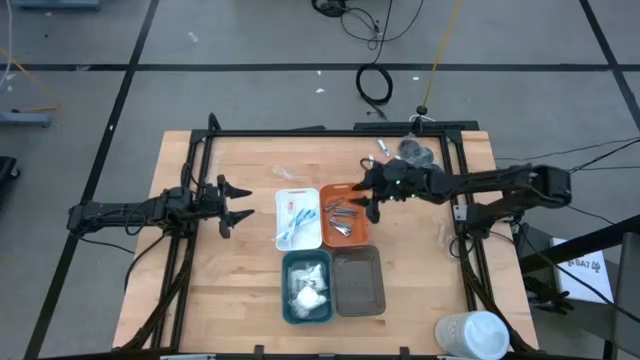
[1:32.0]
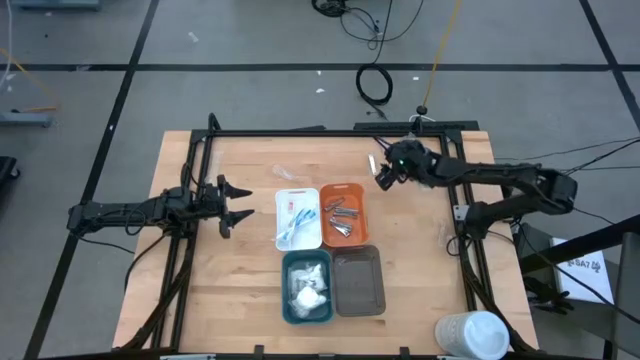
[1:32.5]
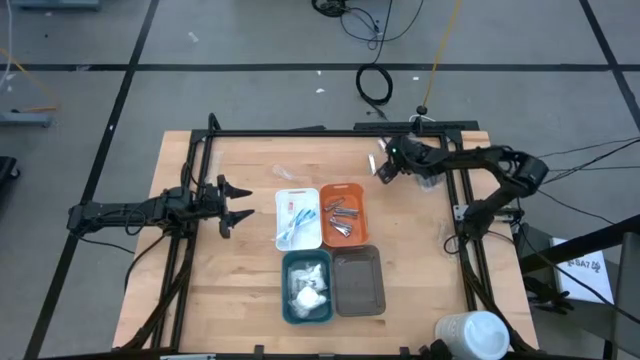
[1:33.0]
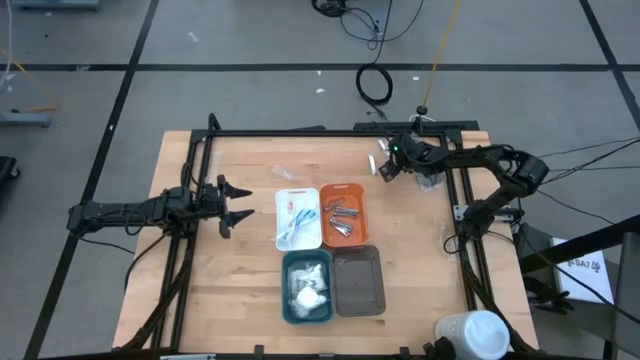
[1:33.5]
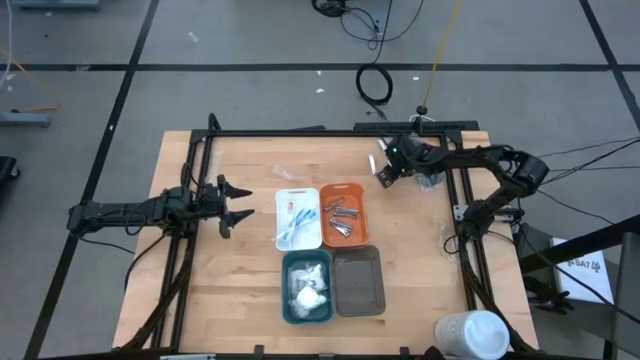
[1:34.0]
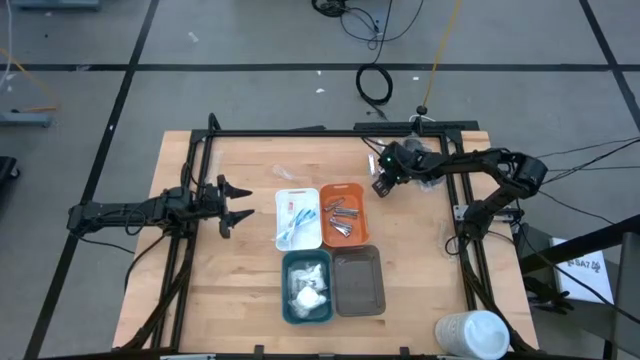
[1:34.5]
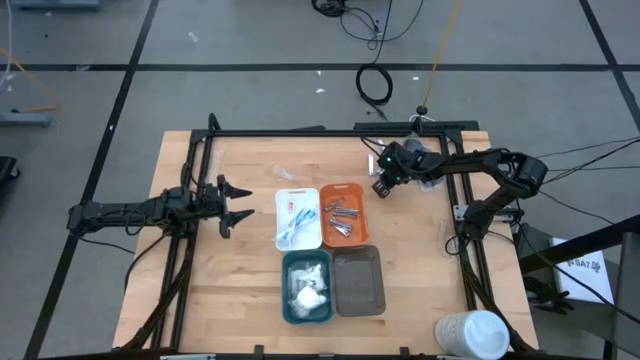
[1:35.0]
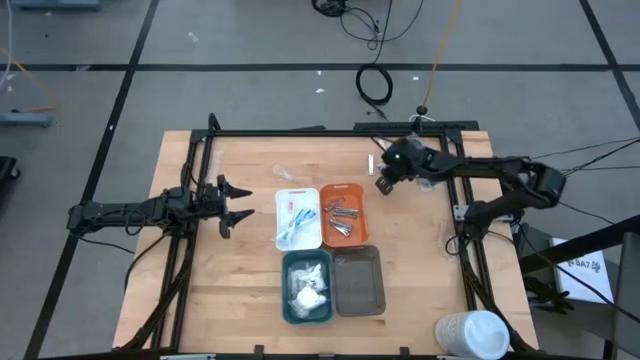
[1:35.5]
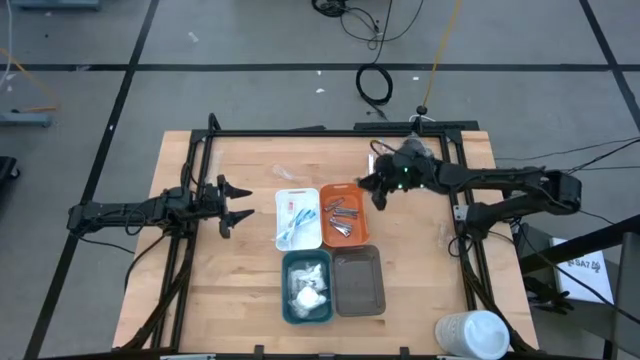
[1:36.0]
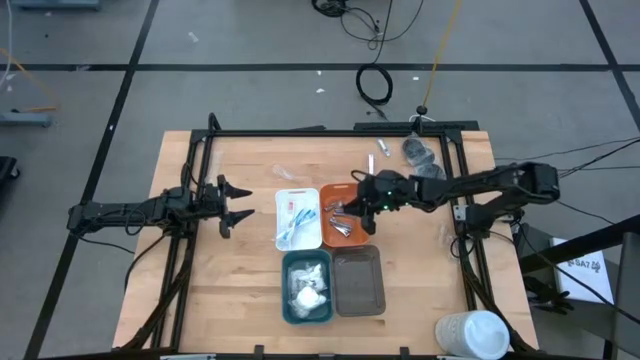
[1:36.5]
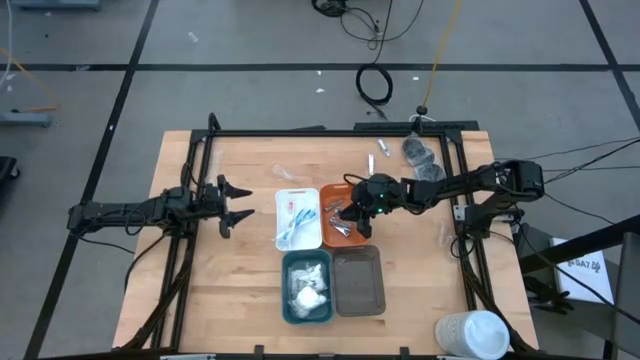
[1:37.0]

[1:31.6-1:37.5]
Task: Pick & Place Travel size toiletries
Put the right nail cutter into the orange bin

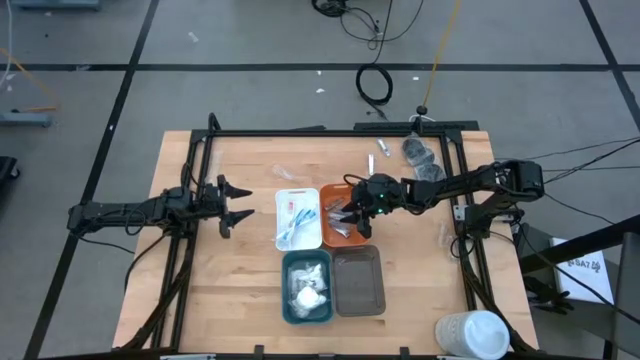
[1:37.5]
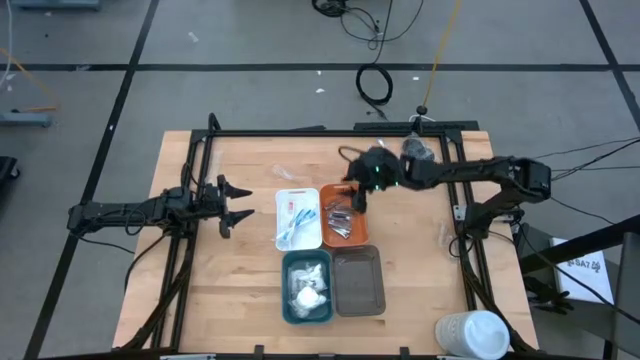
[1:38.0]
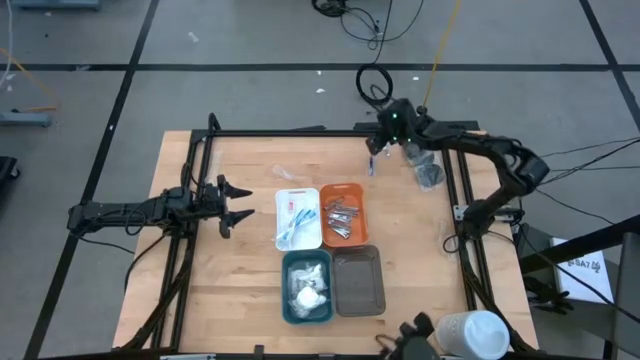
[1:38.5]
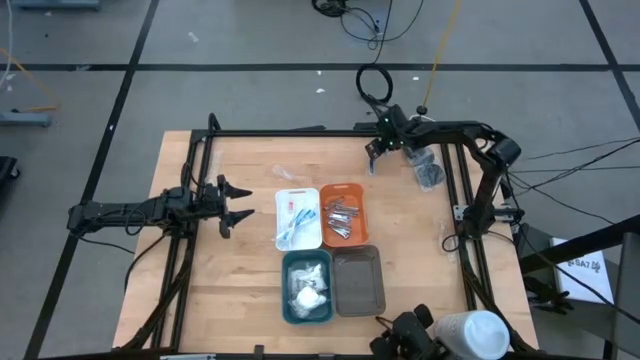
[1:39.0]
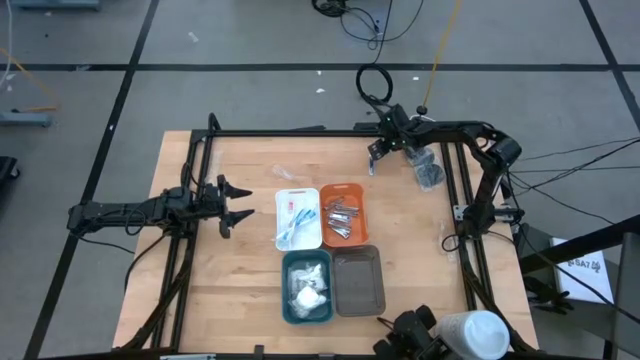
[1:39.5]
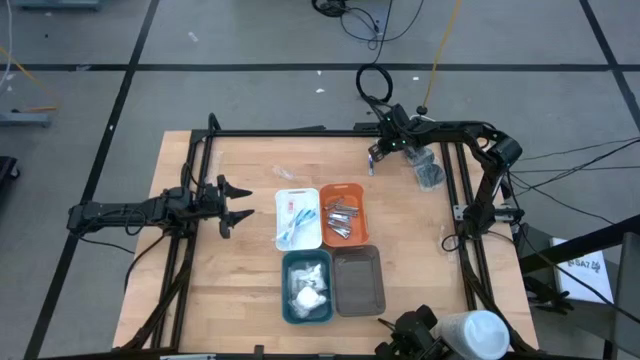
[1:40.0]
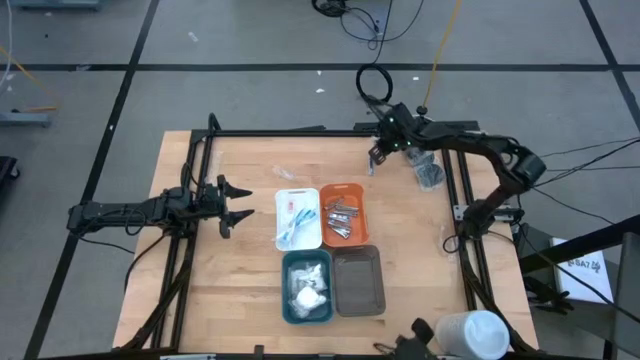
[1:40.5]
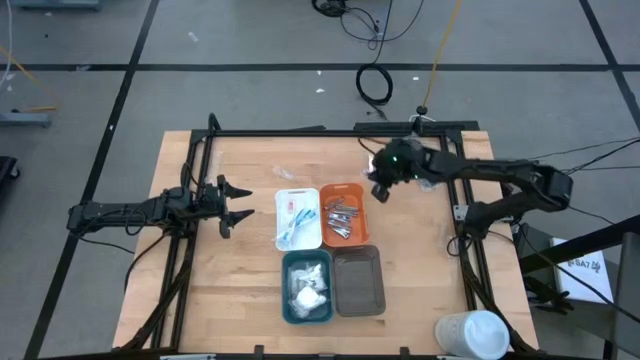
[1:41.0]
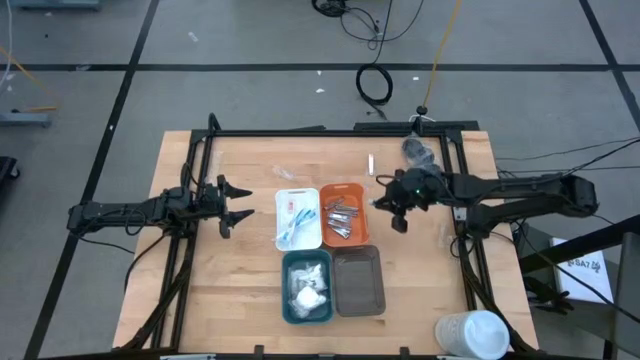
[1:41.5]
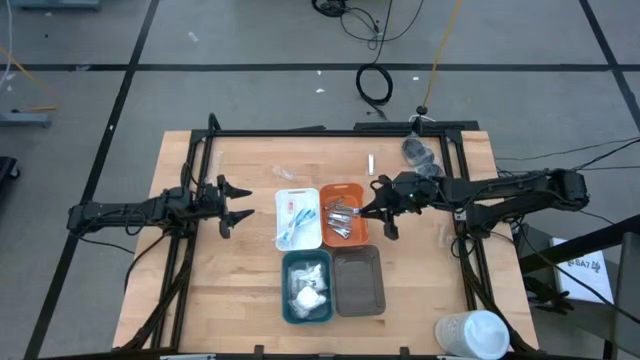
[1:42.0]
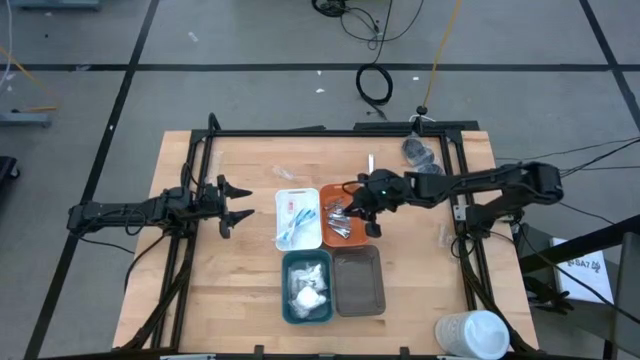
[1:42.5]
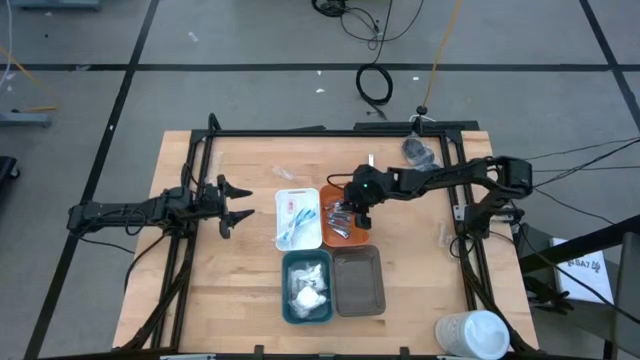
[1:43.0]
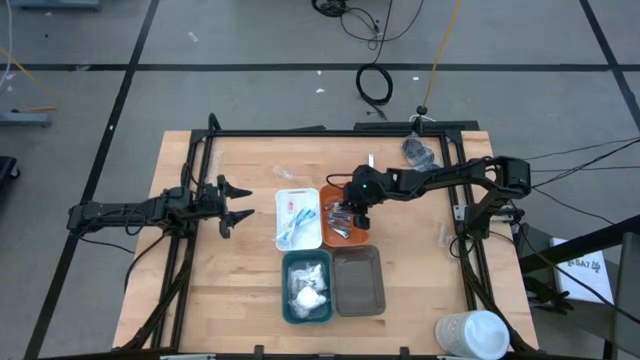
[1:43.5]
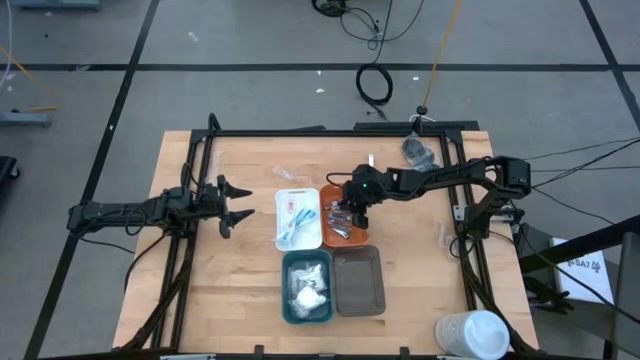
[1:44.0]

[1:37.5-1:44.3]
Put the top nail cutter into the orange bin

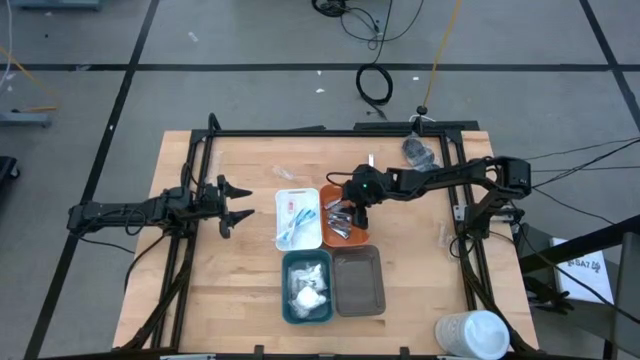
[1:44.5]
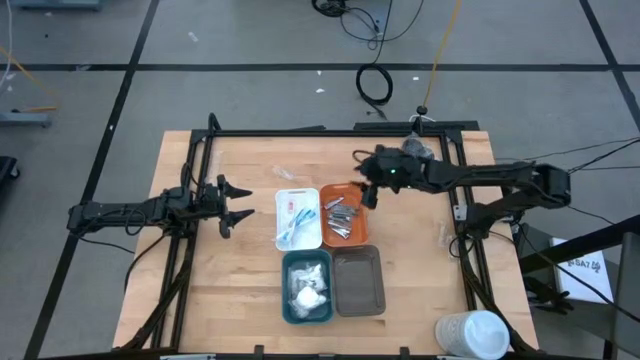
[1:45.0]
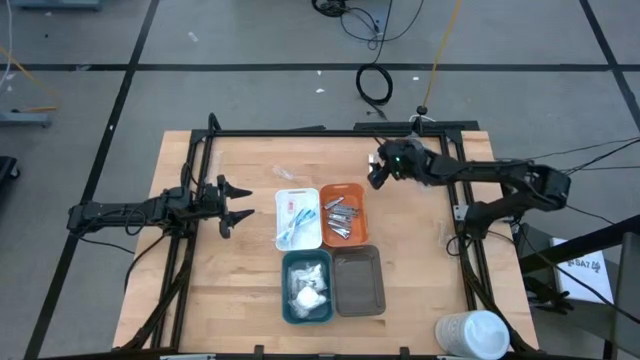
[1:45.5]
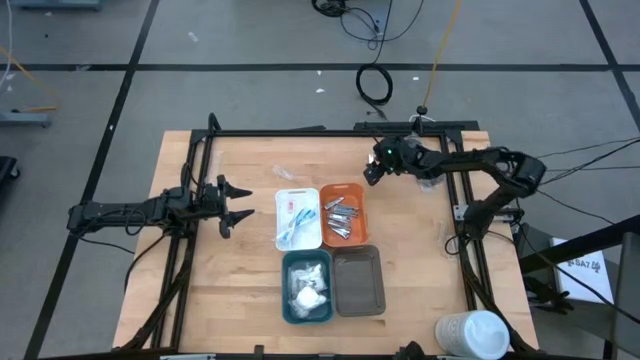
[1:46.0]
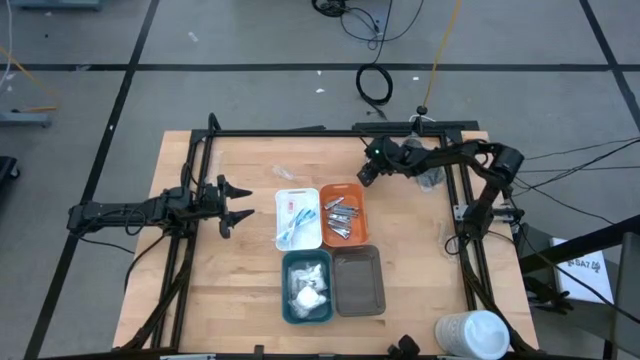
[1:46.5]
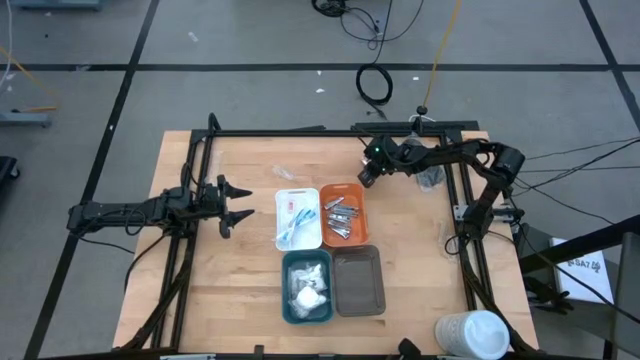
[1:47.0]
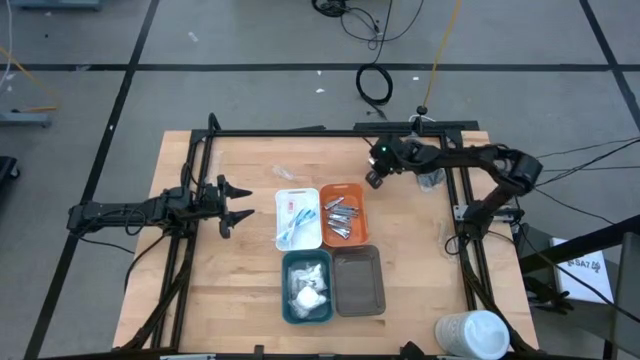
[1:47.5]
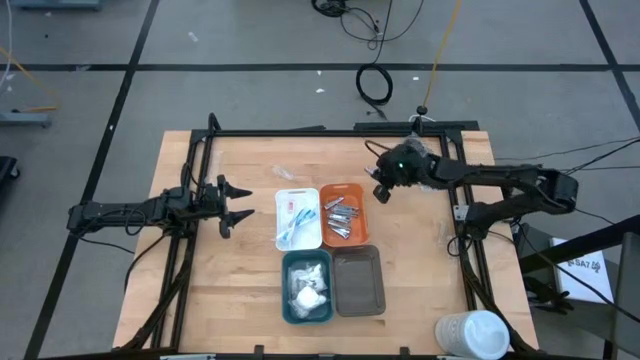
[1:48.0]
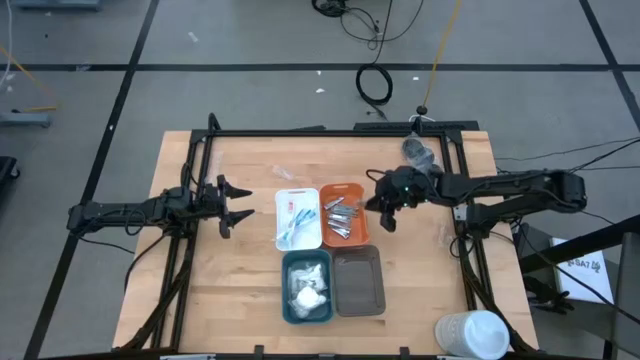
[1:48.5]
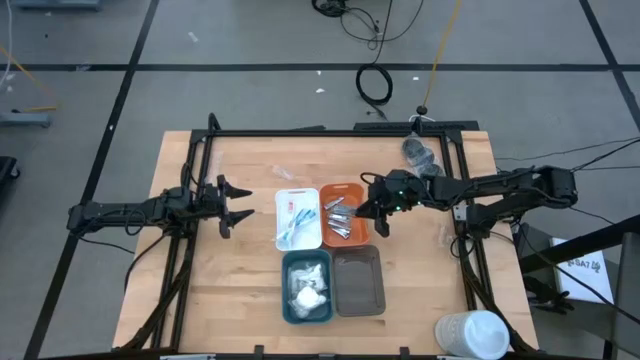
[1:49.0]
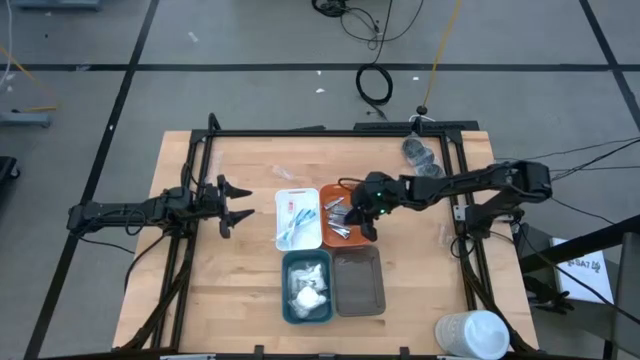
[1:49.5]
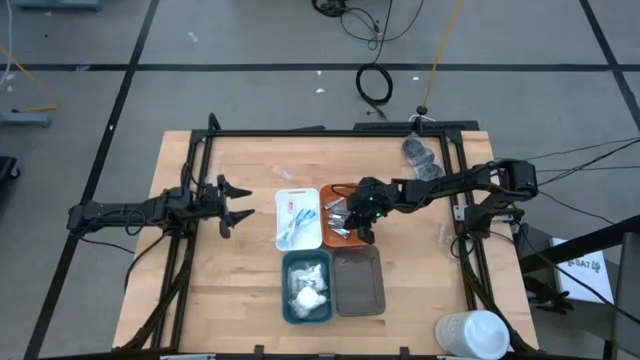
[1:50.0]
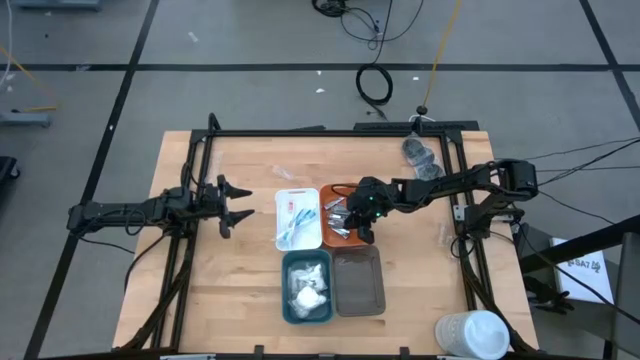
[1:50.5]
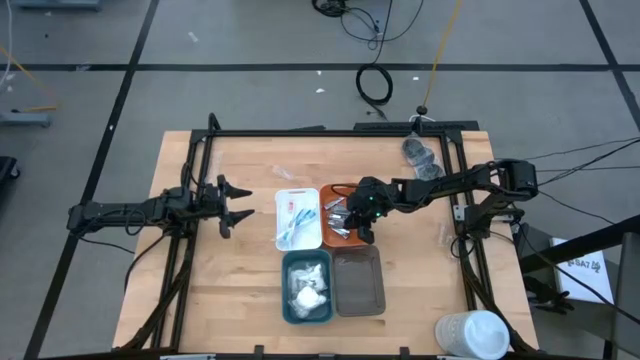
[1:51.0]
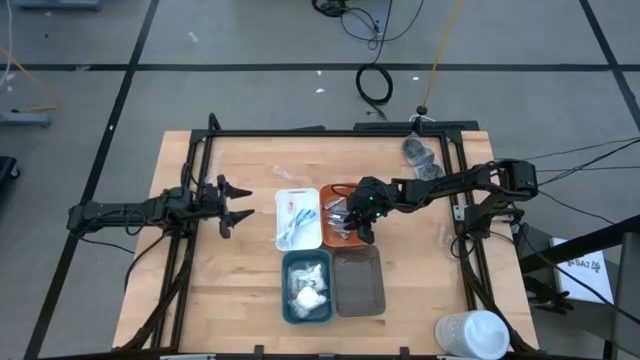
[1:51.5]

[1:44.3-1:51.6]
Put the nail cutter into the orange bin

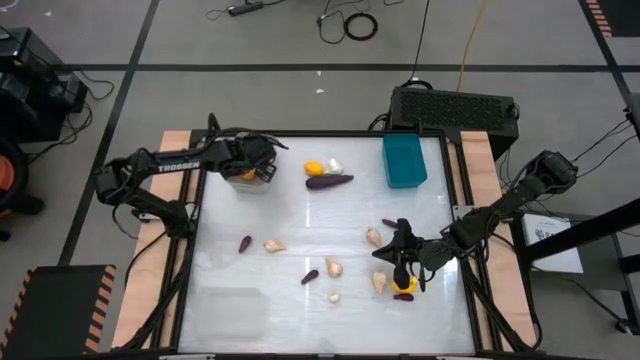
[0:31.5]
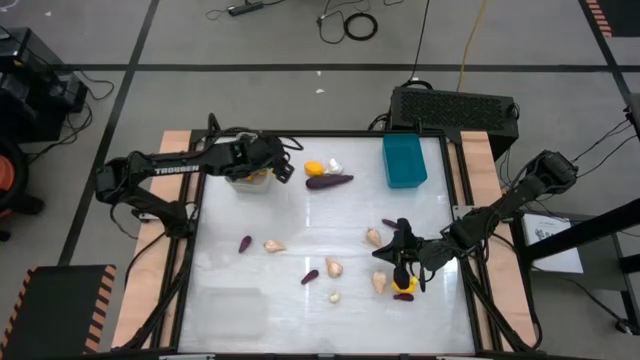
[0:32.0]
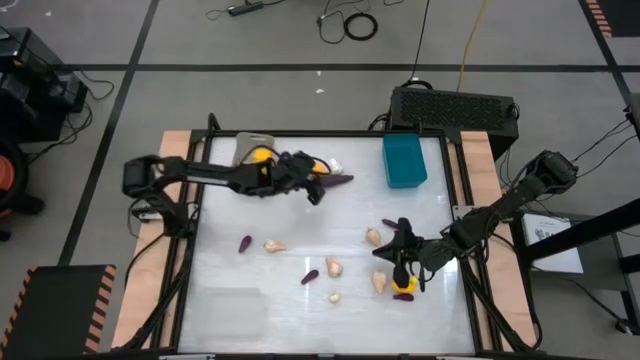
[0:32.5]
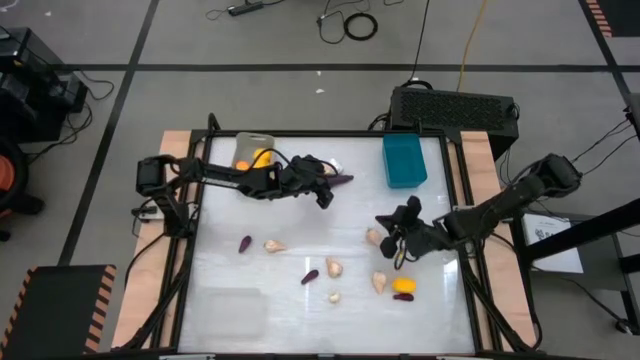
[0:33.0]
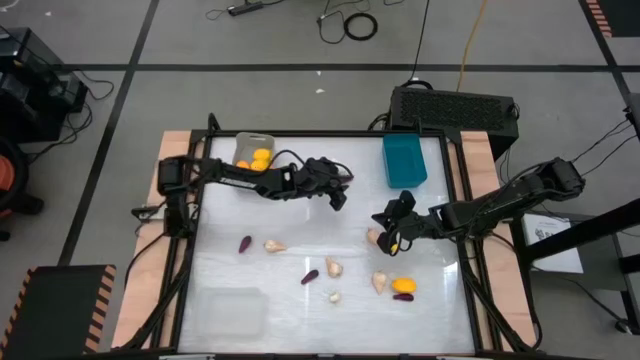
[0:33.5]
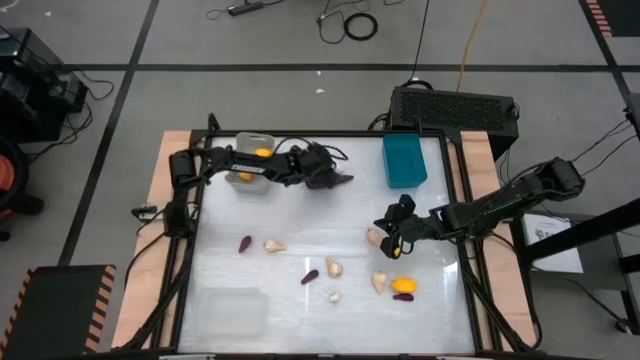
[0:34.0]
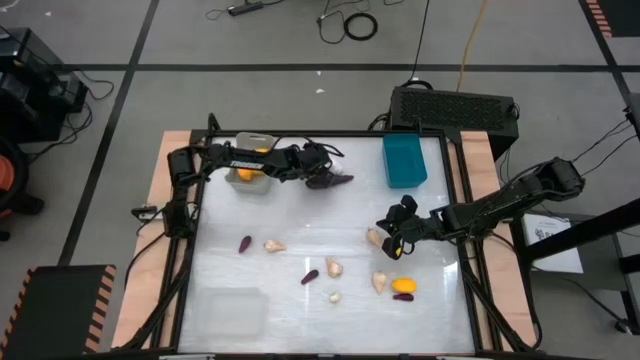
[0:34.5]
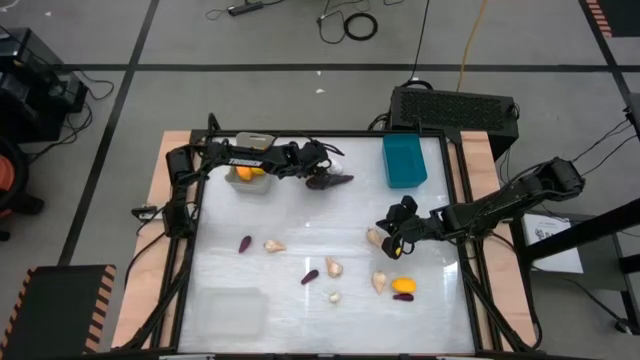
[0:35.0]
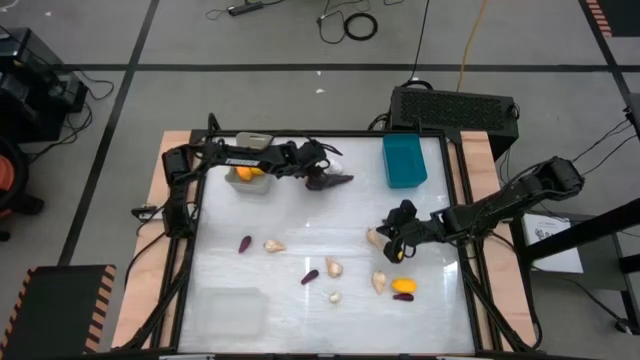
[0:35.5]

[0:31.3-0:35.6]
Task: Sort produce into baskets
Put the lemon into the gray bin
